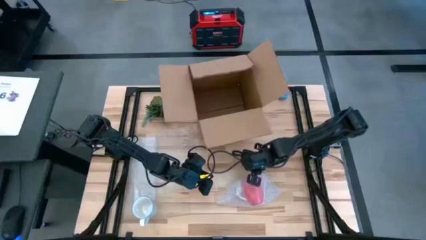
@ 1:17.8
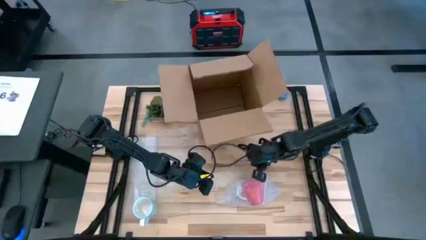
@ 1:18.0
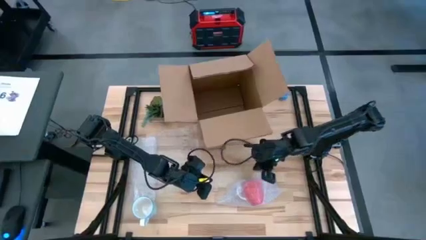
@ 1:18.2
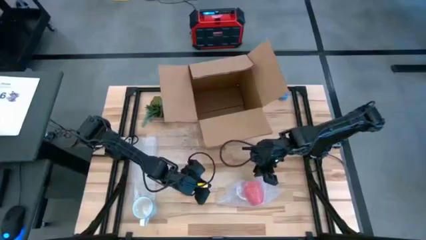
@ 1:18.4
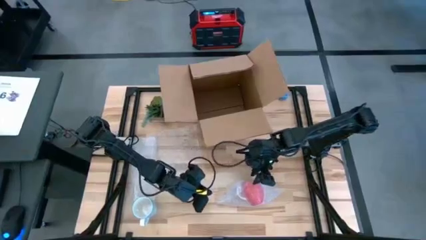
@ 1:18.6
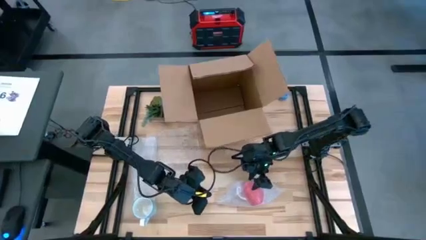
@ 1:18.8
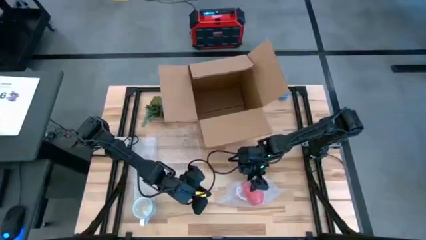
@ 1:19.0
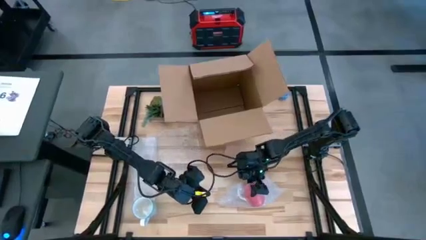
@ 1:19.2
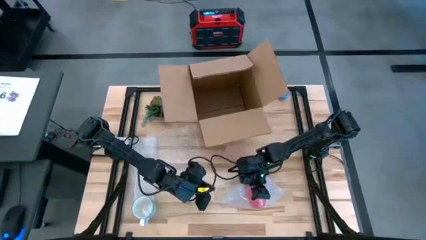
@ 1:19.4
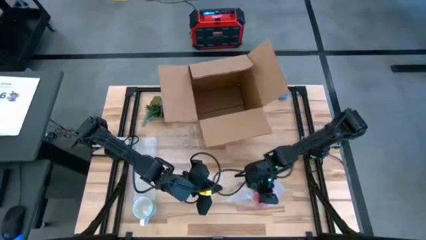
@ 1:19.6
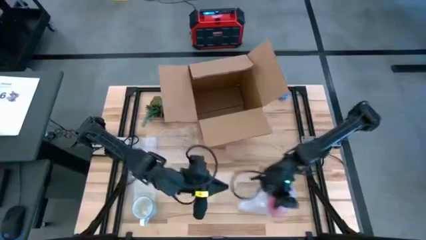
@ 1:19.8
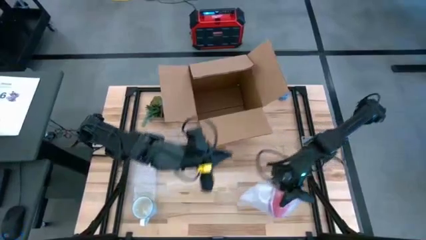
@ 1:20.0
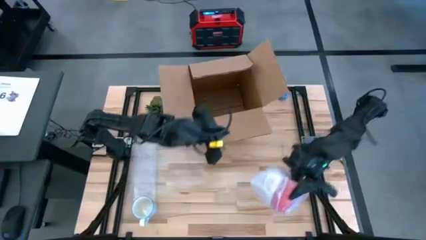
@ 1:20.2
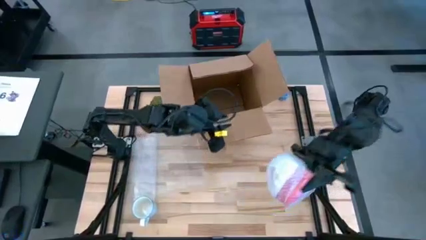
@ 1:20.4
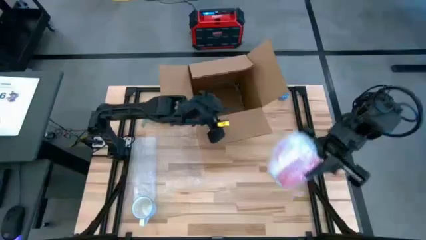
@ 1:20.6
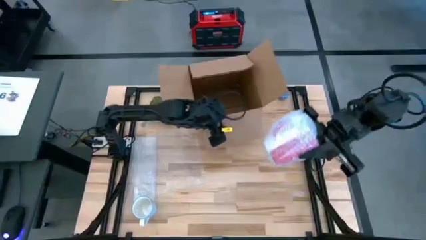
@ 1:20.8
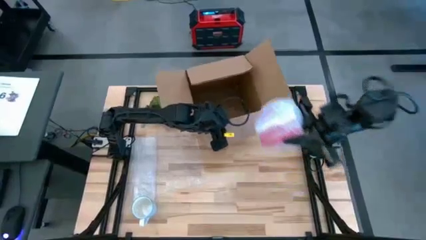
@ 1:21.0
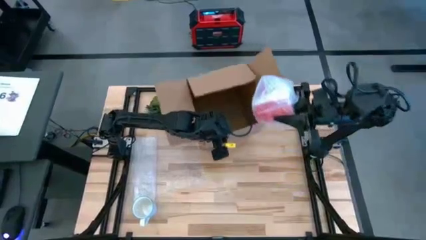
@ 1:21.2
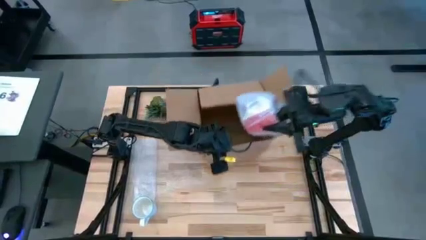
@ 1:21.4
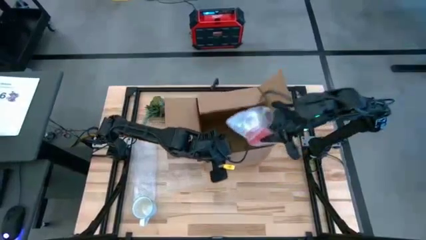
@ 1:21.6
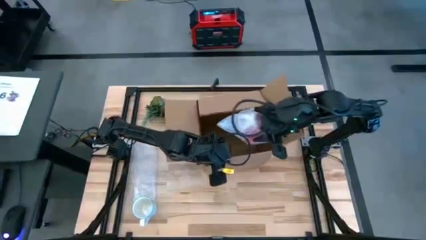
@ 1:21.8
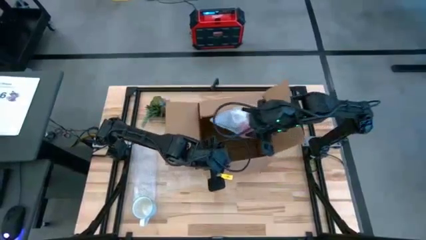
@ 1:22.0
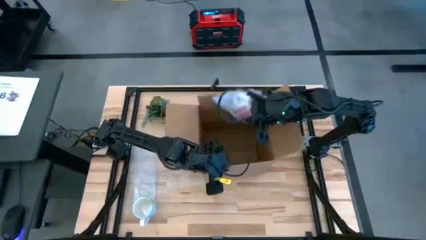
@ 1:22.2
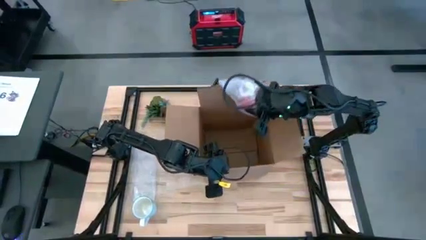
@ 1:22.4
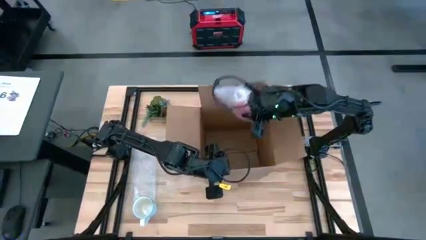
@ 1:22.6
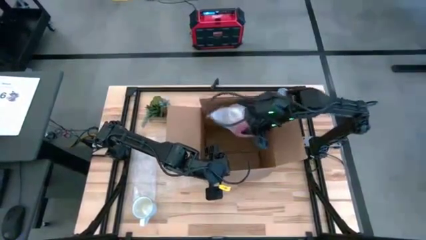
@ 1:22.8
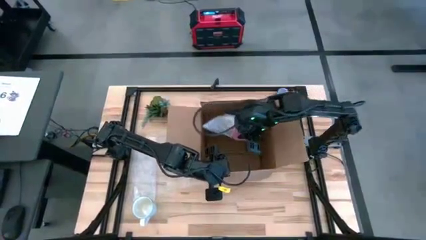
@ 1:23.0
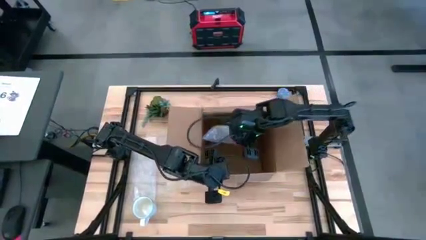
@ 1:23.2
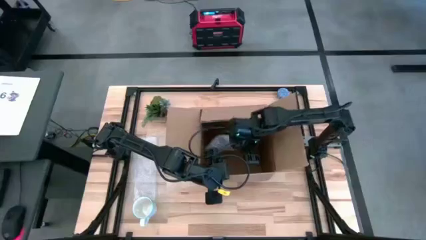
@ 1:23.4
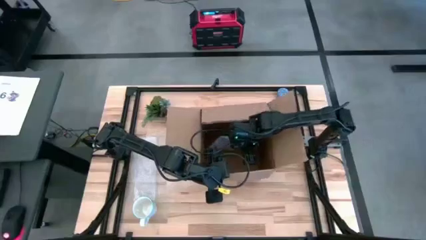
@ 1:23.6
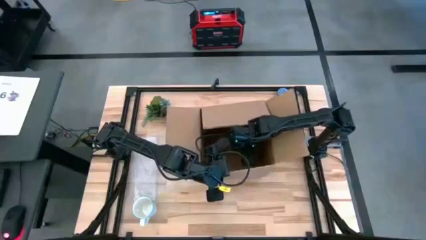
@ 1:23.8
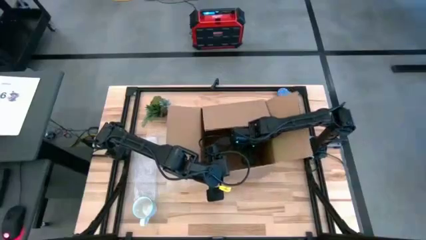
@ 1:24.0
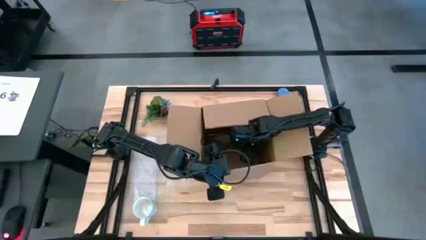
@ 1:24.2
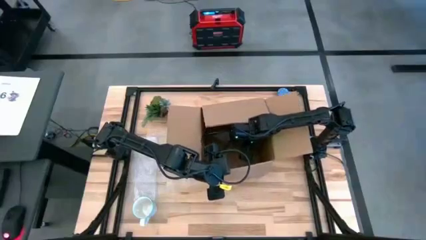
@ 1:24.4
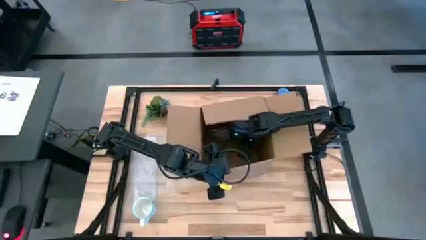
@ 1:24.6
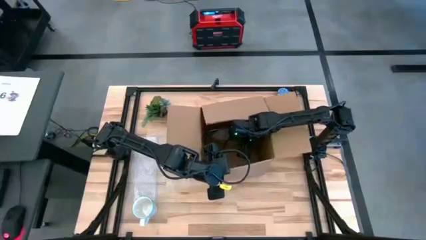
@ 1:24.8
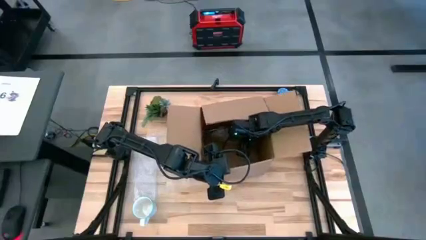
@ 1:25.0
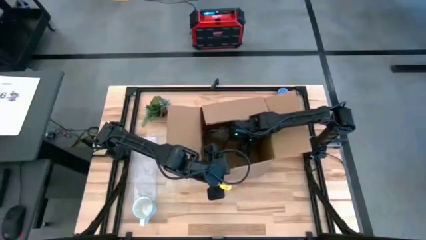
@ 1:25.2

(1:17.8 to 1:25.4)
Task: wrap mug
Put the wrapped red mug into the cardboard box

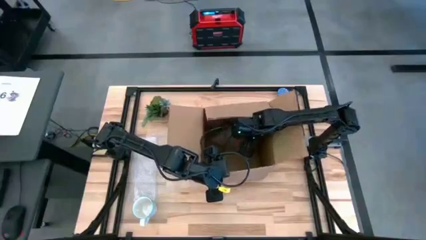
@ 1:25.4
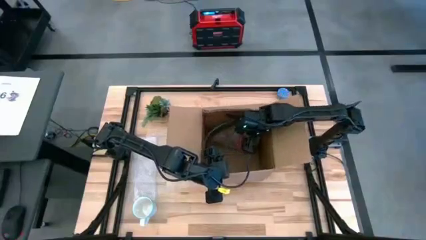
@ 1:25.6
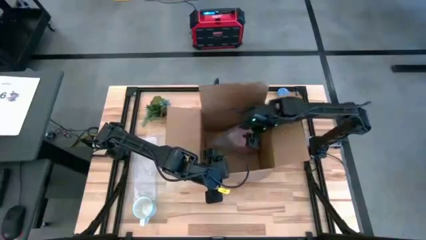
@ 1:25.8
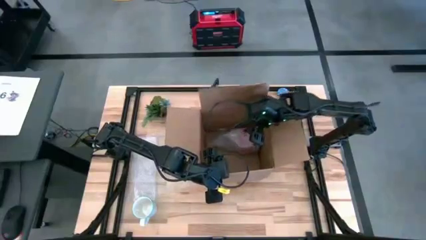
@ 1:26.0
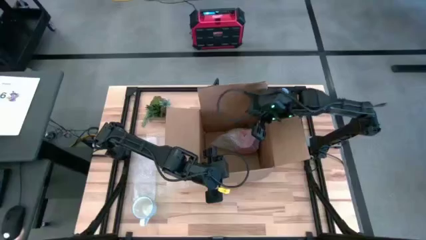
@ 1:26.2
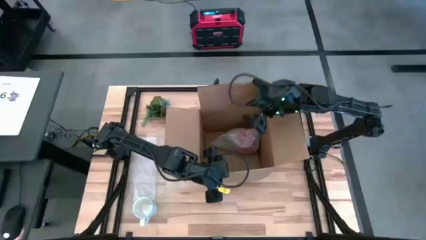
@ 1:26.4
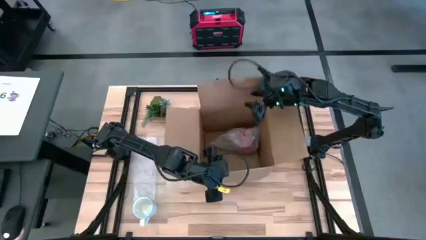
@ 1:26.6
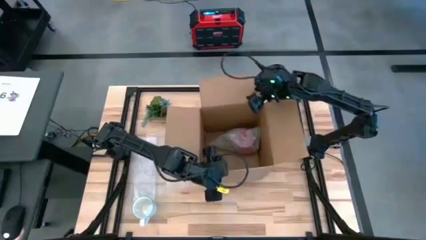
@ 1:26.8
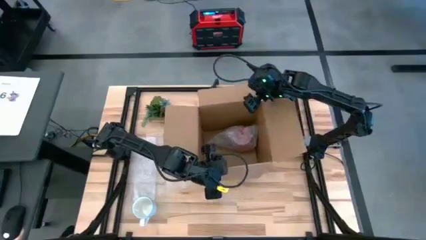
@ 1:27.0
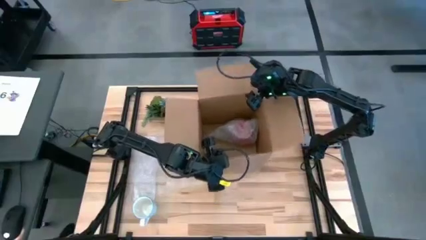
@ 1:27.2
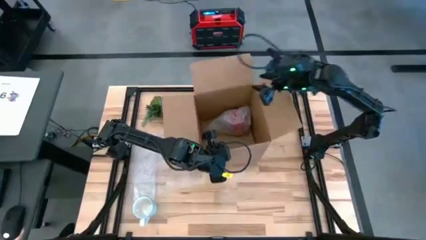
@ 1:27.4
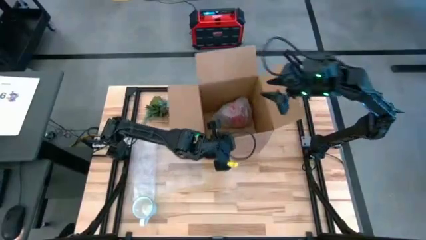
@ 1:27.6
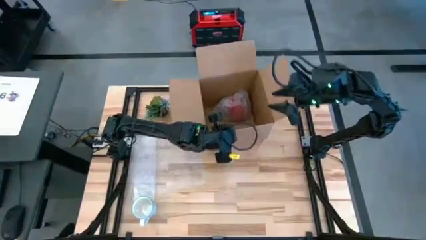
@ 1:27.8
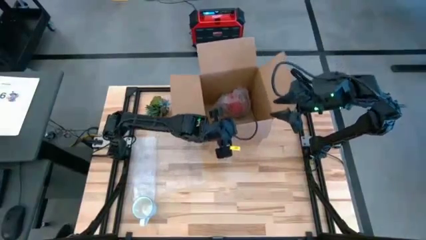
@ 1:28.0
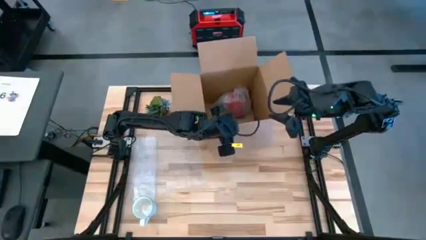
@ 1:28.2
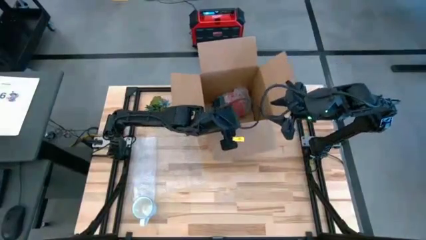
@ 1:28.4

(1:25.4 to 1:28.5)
Move the cardboard box to the top center of the table

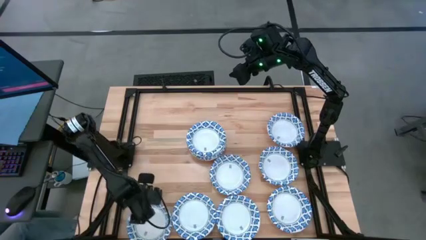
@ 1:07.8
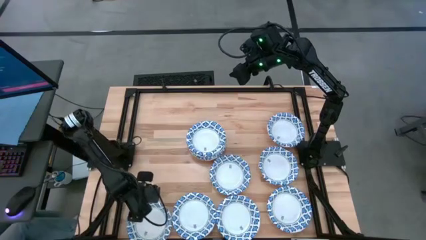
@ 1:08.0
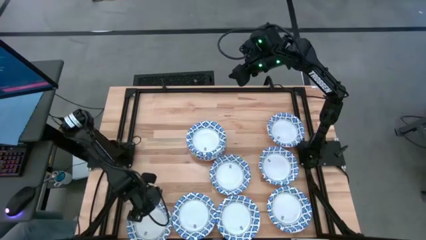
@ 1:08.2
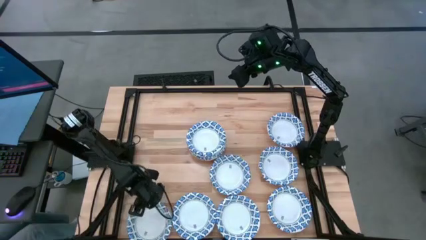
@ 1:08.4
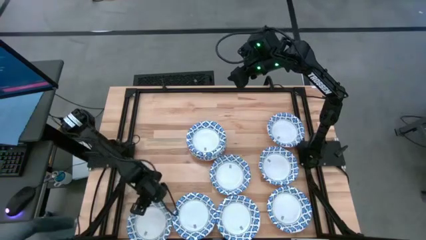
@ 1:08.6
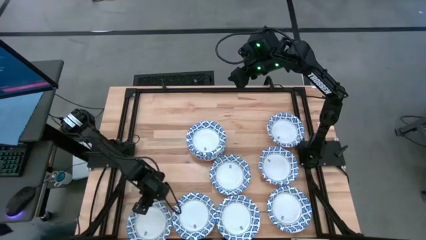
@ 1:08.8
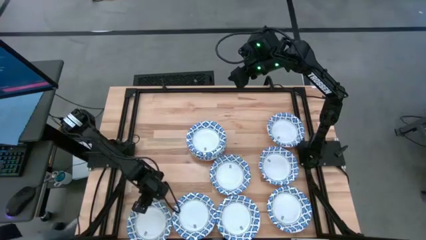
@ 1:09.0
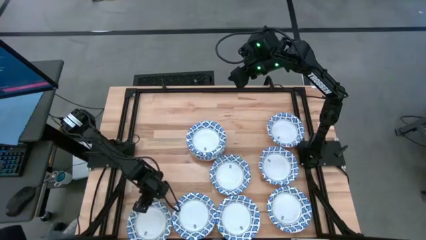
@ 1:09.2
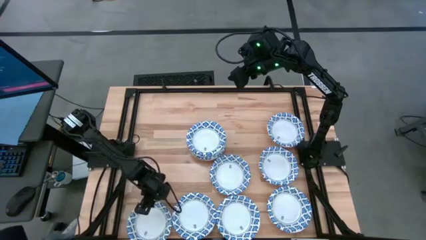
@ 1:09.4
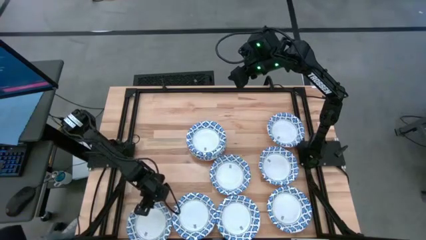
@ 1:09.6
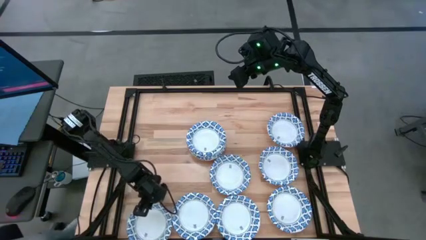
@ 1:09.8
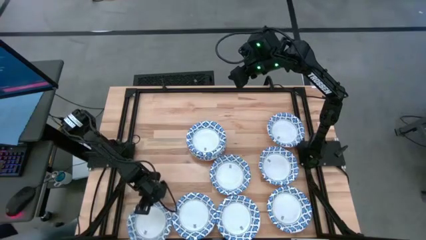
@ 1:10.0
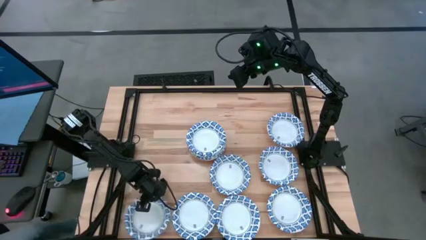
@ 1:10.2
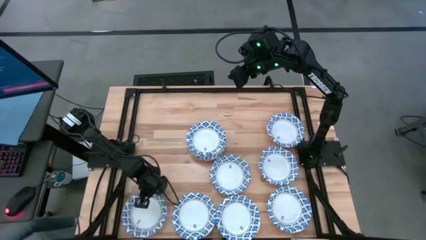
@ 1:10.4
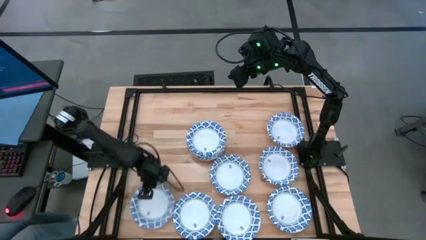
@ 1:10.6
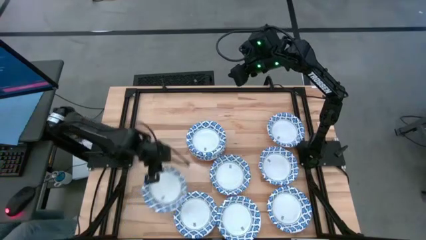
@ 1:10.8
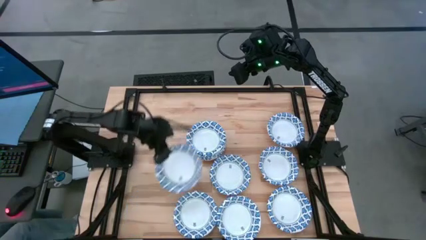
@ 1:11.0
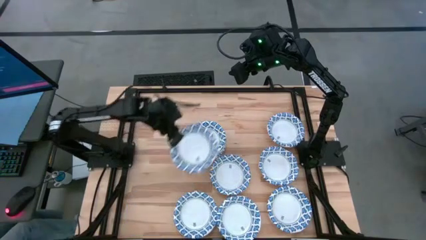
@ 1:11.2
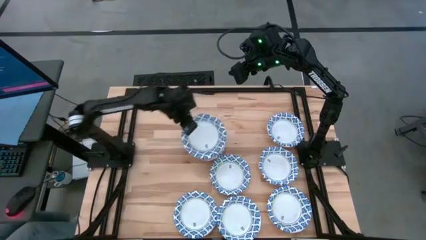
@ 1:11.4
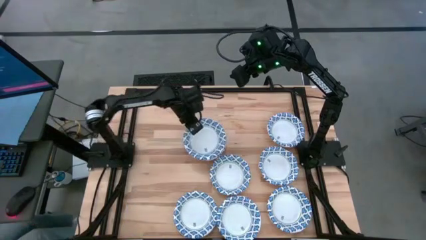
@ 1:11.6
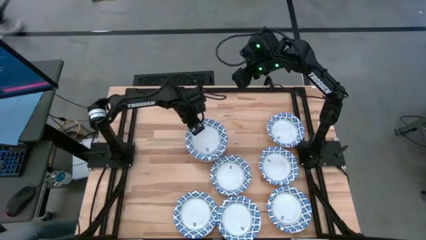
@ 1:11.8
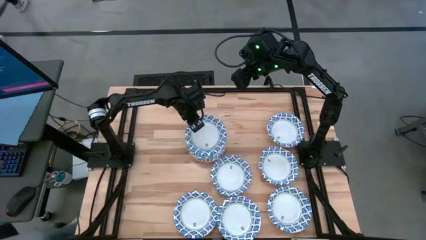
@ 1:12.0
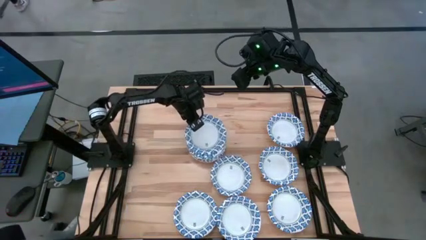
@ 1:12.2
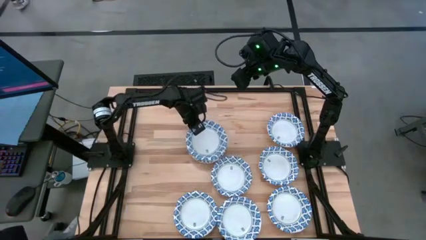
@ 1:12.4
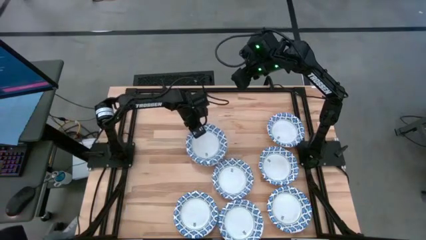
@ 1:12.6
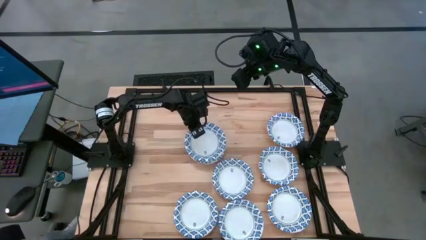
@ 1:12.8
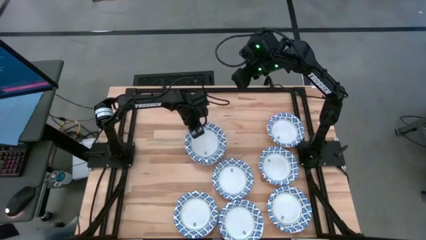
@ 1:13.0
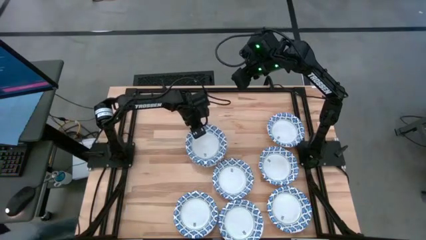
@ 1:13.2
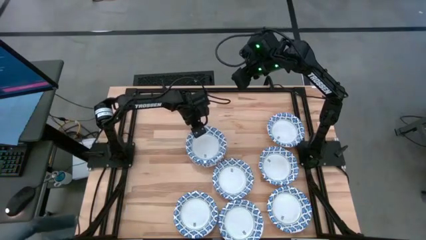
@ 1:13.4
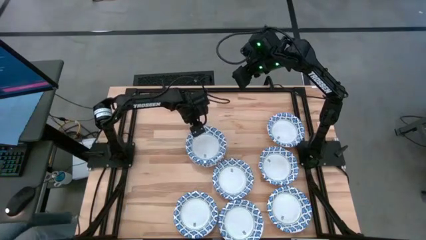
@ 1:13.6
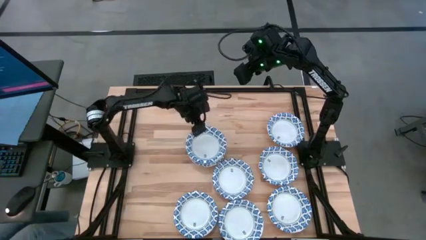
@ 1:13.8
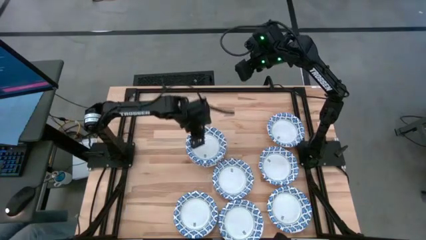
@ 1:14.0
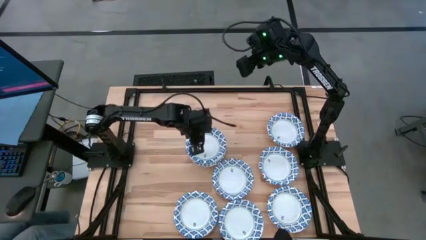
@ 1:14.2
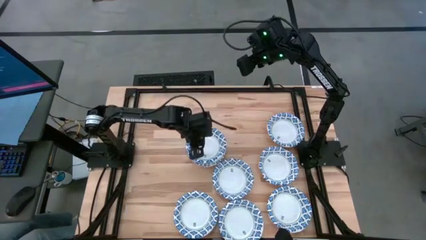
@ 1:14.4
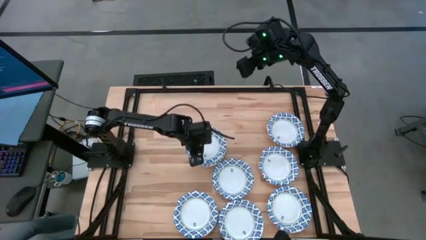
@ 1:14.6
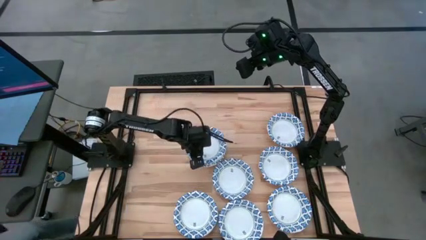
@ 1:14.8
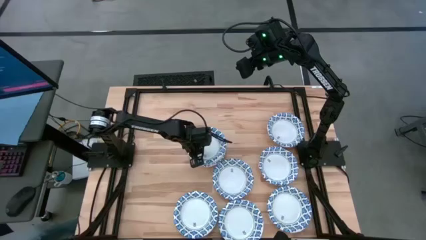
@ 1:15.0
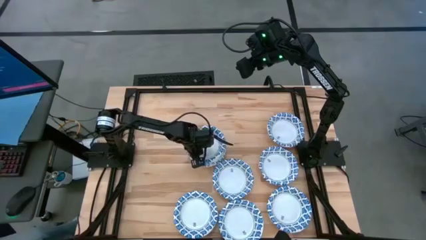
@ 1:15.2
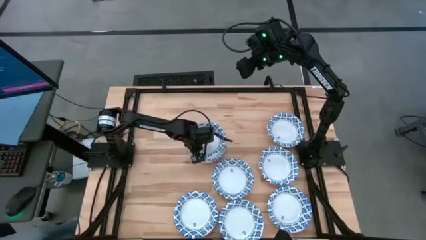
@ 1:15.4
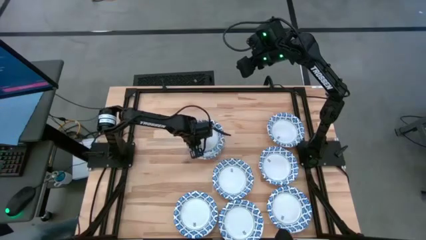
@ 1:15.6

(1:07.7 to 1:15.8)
Task: Nest bowls inside each other
Stack the blue bowl on top of the blue bowls
